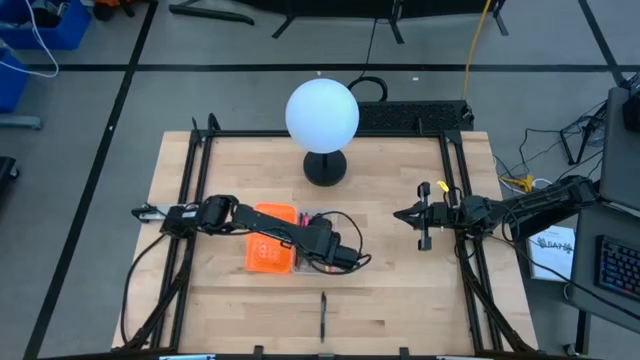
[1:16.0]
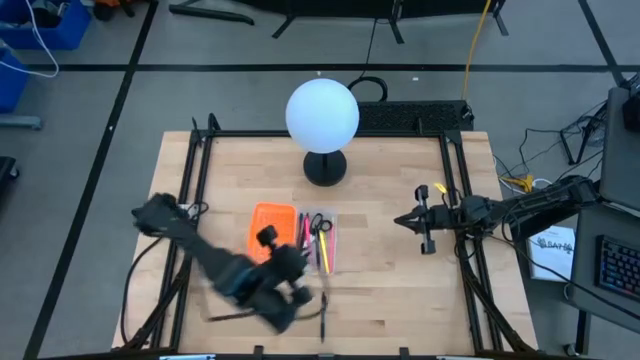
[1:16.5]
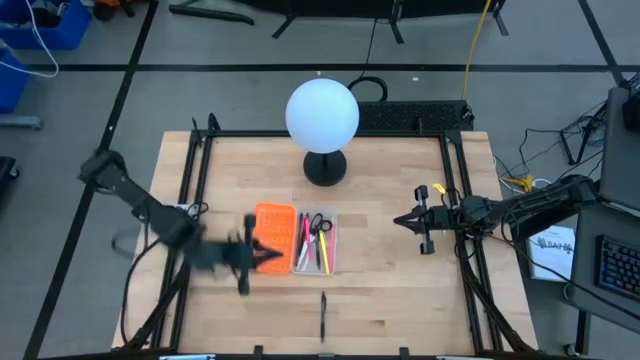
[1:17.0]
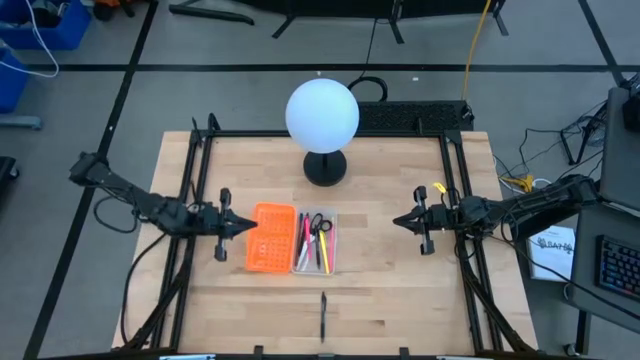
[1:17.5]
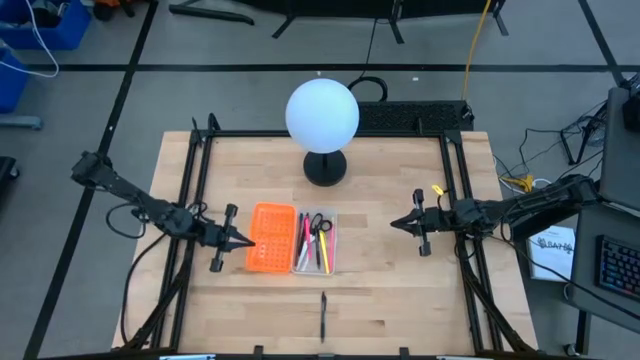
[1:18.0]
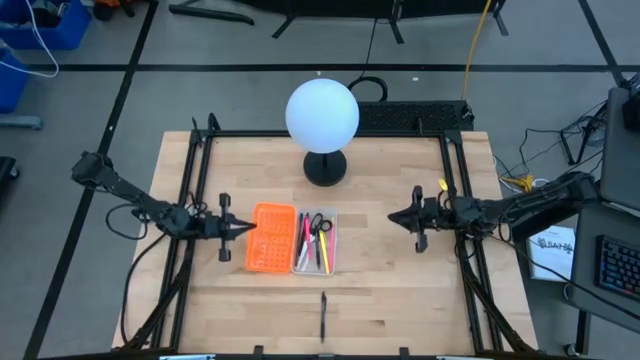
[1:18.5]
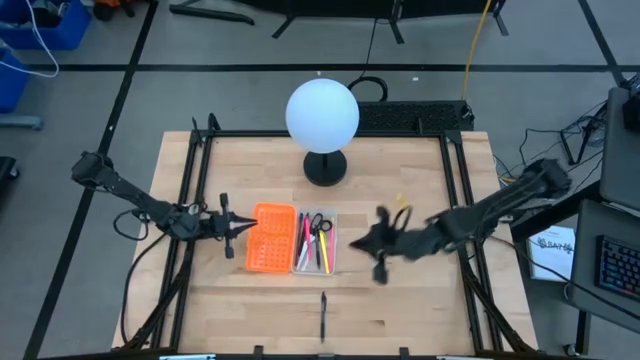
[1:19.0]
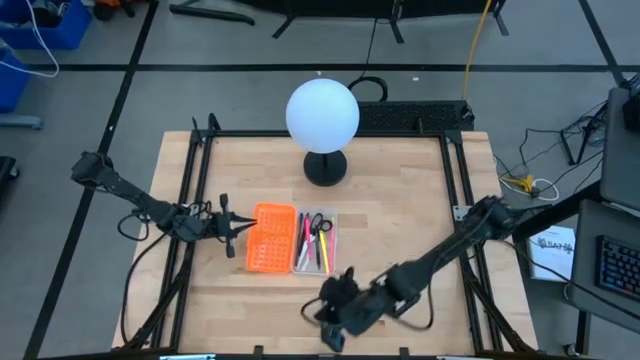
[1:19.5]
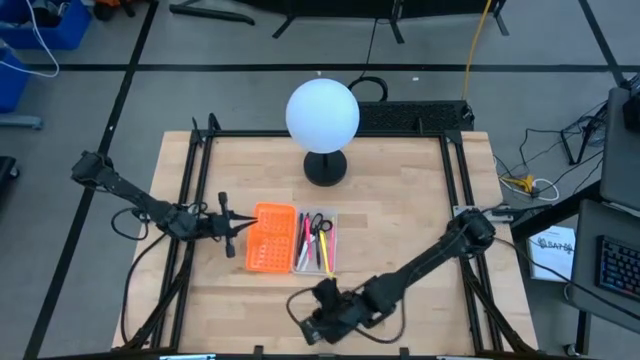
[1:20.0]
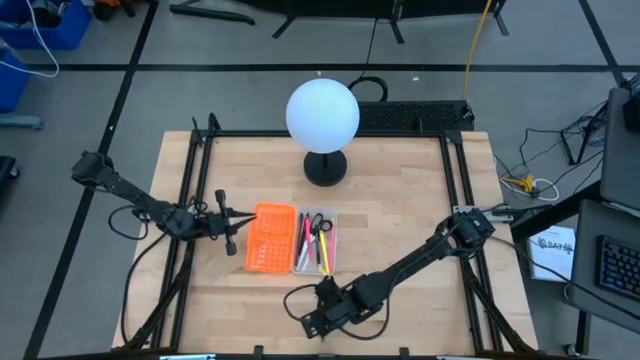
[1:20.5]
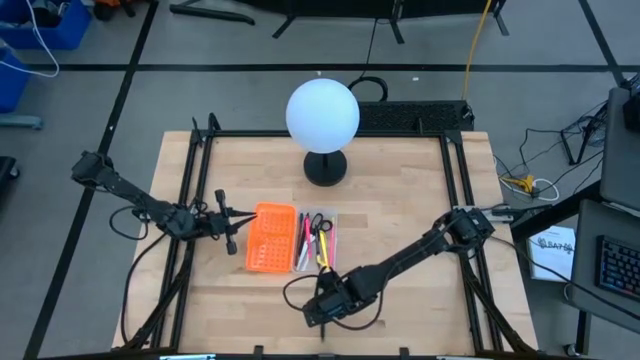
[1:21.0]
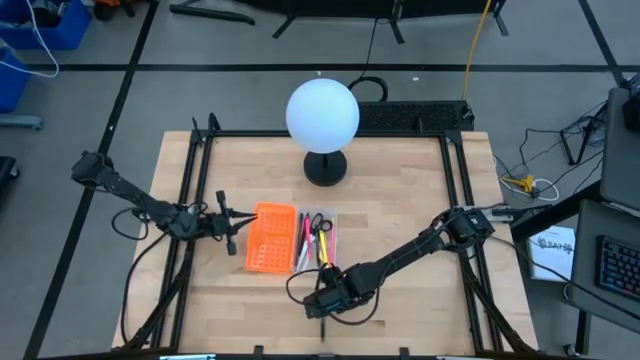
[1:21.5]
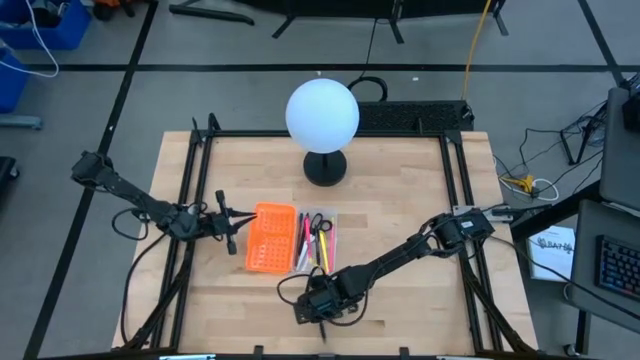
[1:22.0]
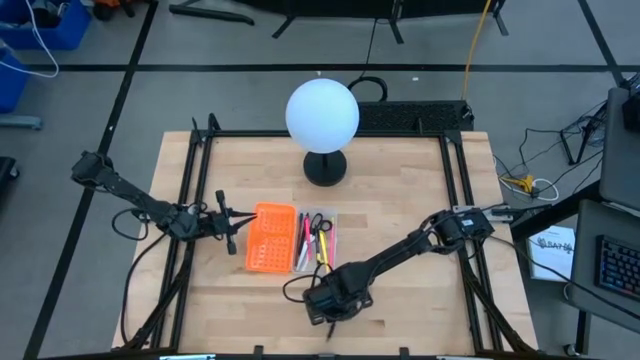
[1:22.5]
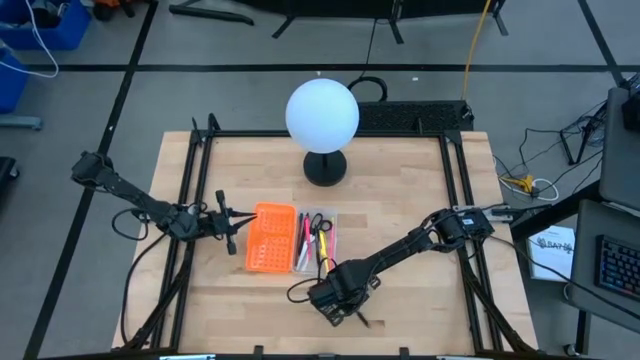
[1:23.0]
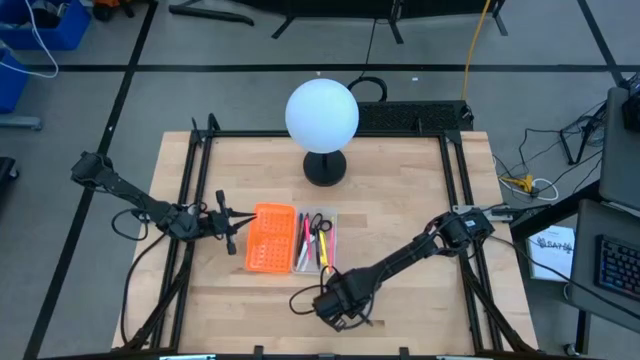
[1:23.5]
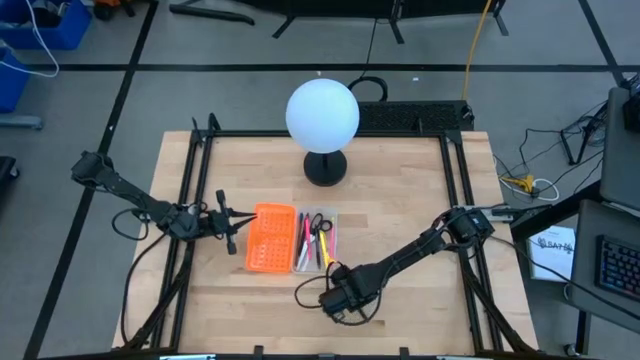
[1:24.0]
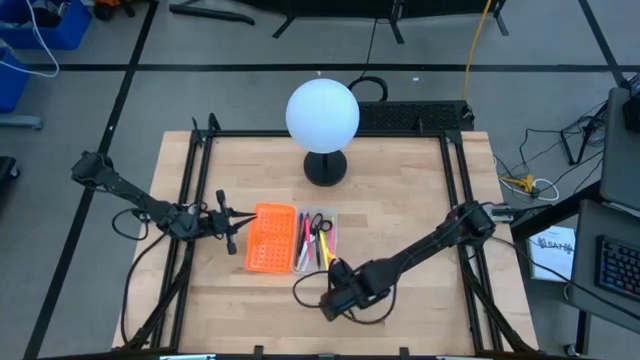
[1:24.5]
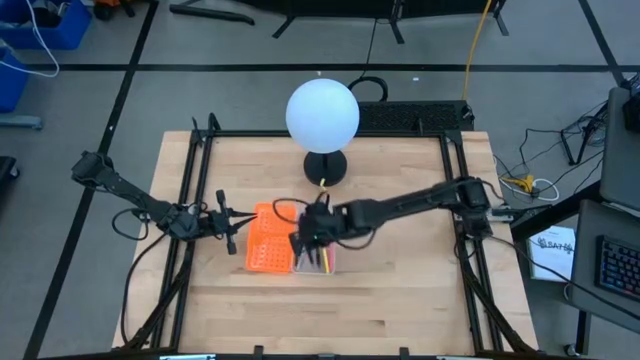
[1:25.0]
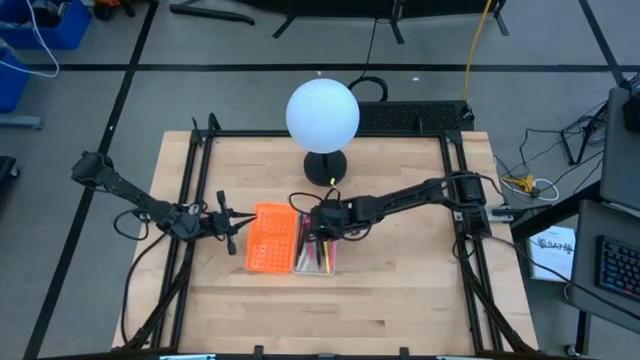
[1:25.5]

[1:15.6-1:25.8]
Task: Pick & place school supplies into a supply box
Put the black gel pen into the orange supply box

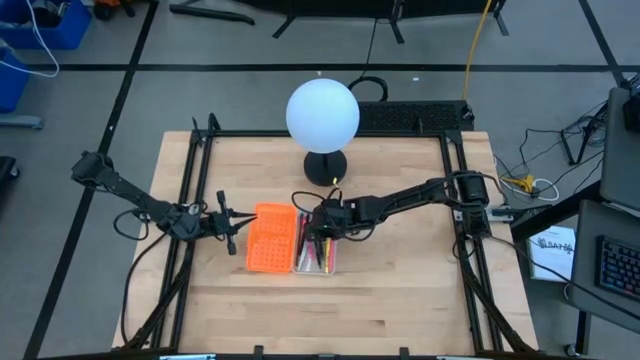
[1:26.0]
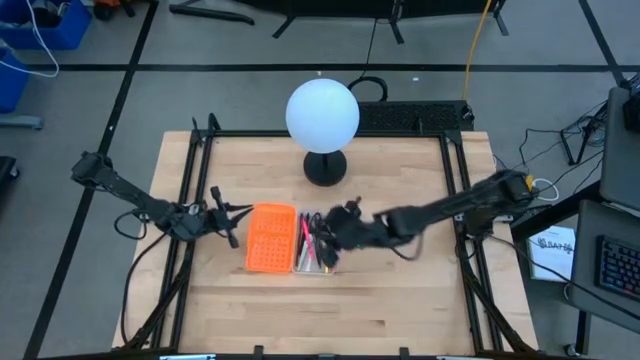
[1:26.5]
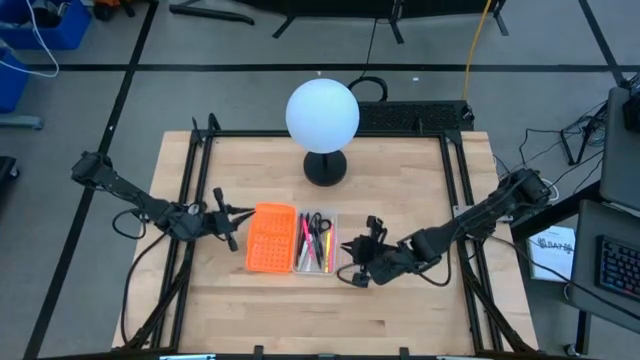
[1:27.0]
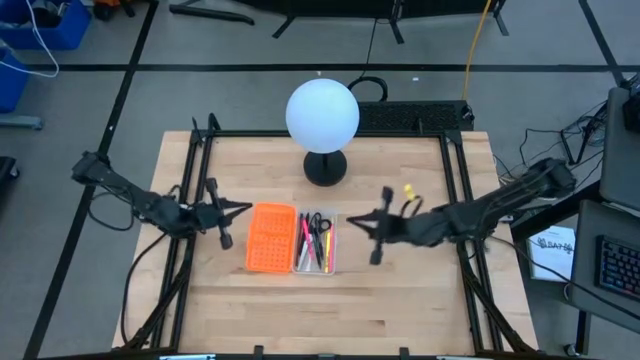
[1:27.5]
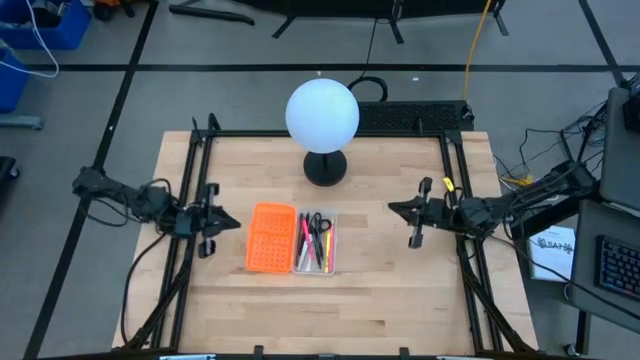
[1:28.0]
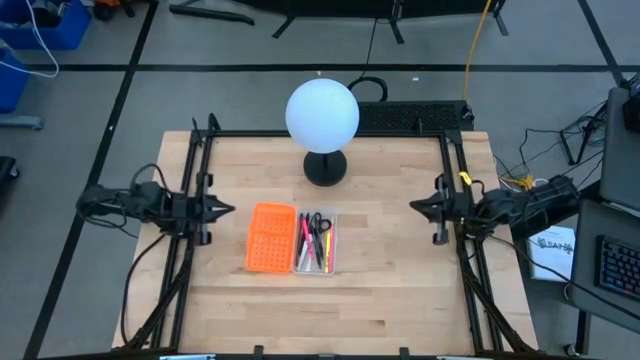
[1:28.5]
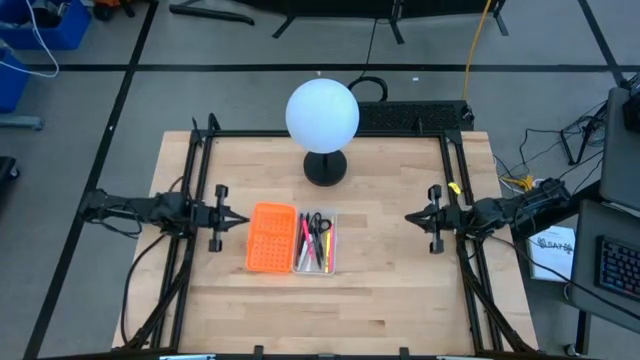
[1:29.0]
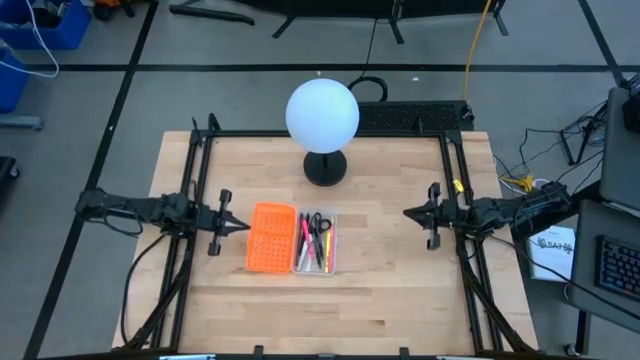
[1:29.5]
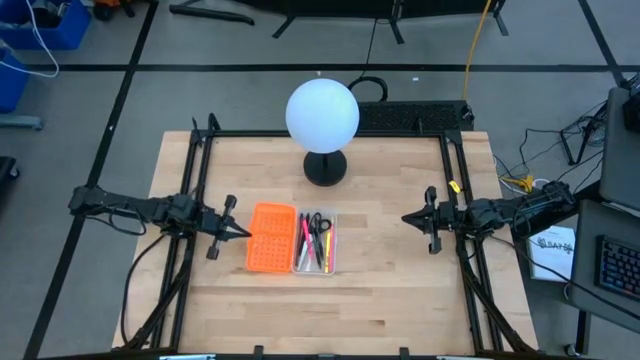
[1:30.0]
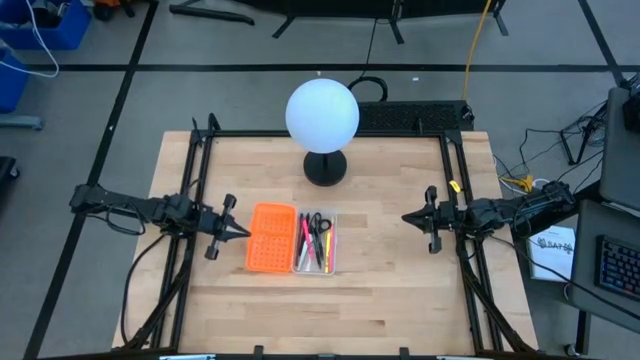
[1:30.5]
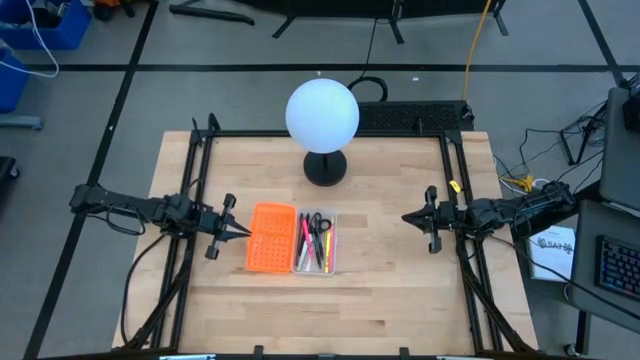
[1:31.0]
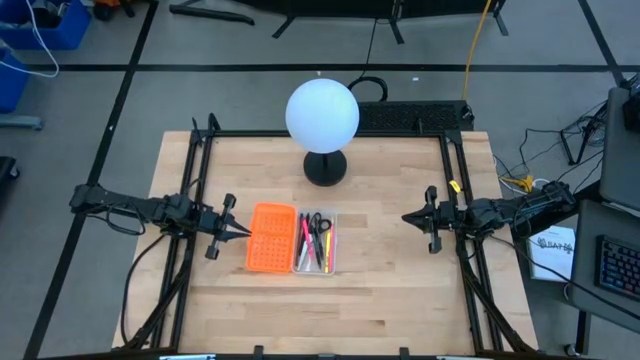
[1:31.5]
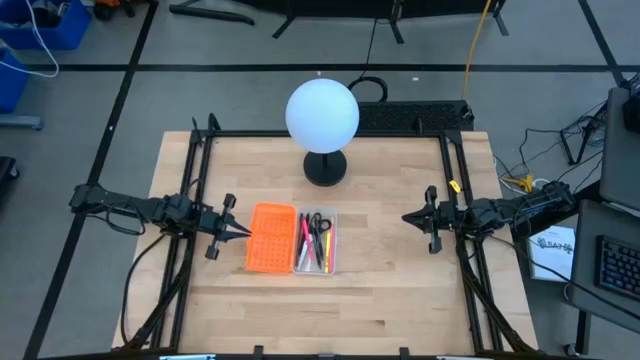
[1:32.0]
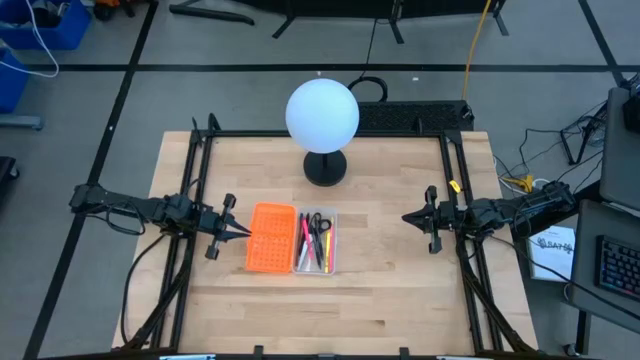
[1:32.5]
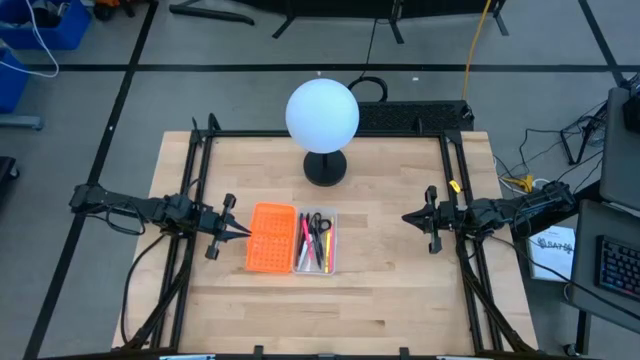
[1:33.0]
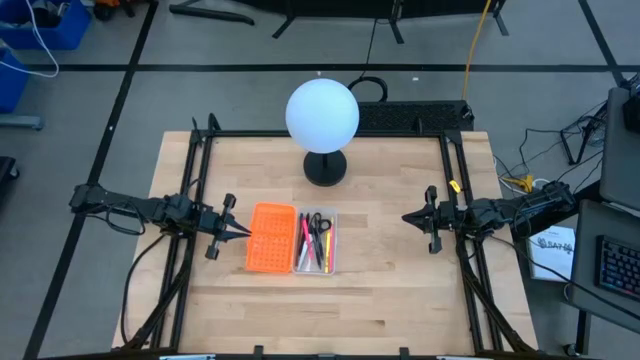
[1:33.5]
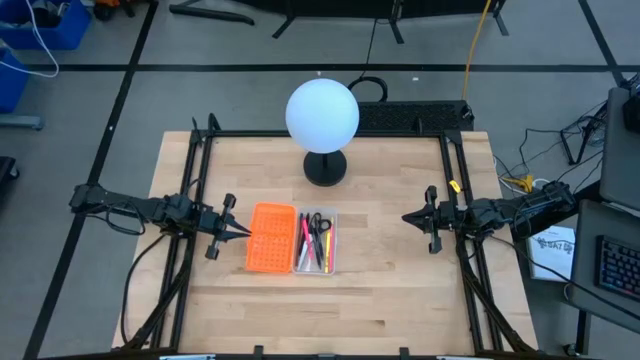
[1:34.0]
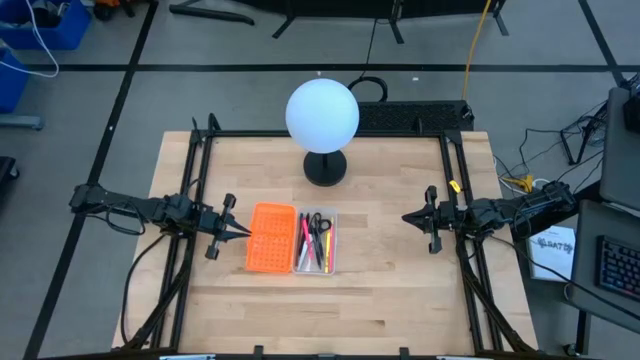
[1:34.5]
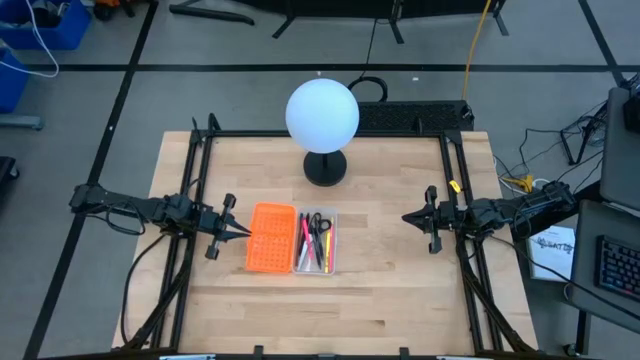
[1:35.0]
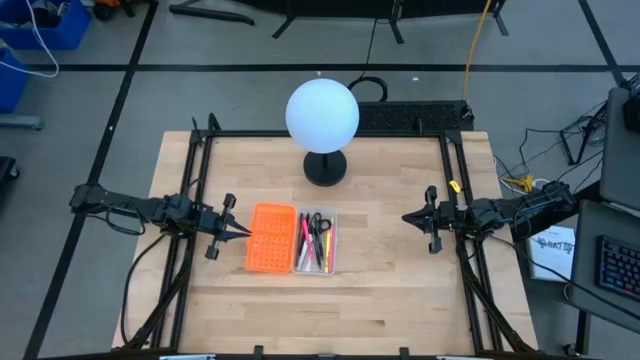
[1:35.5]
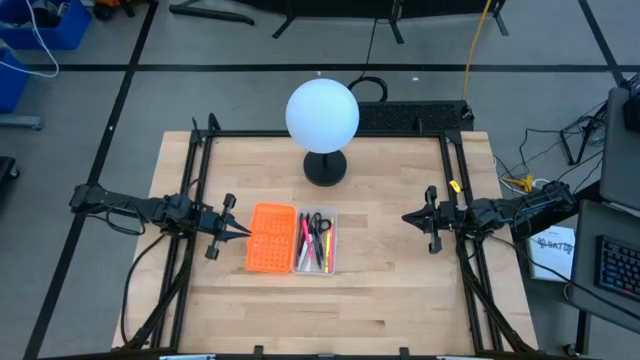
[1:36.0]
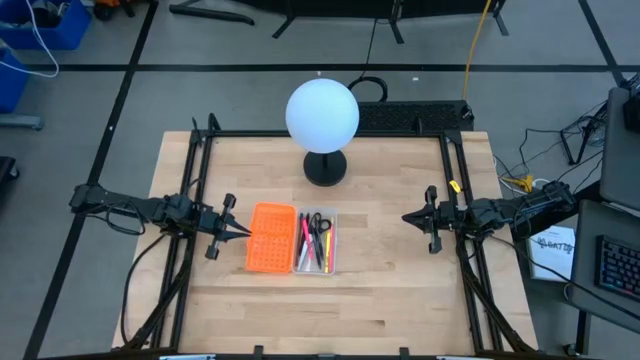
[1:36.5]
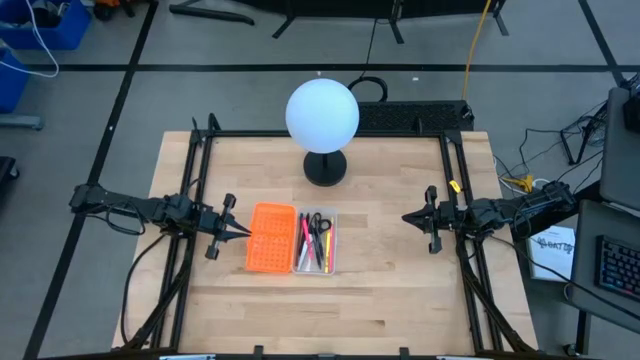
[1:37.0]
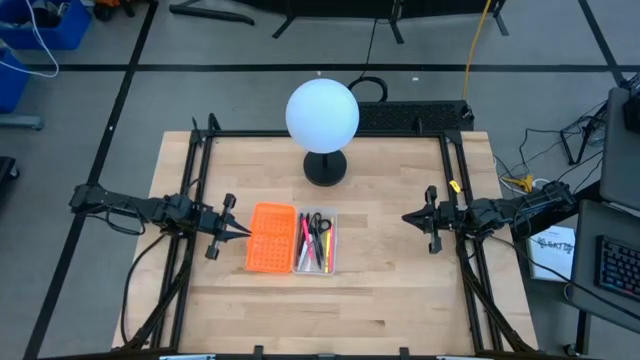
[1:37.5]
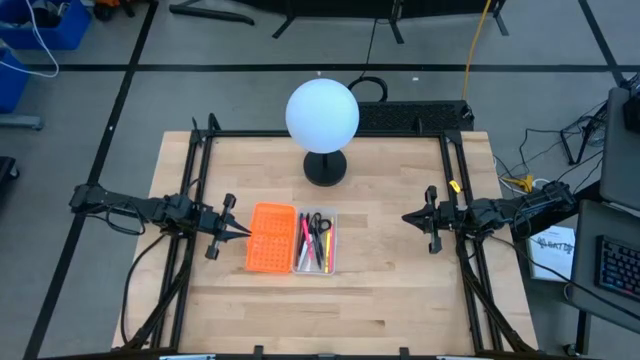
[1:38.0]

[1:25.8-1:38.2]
Return to Home Position

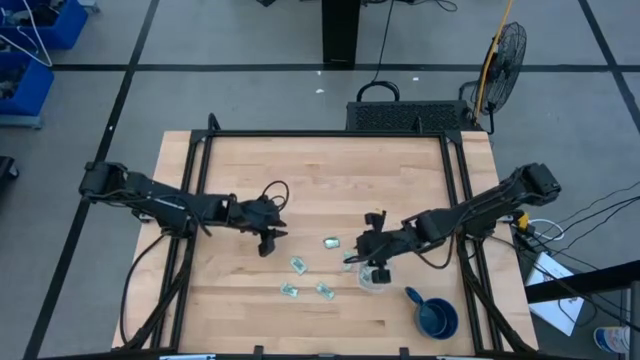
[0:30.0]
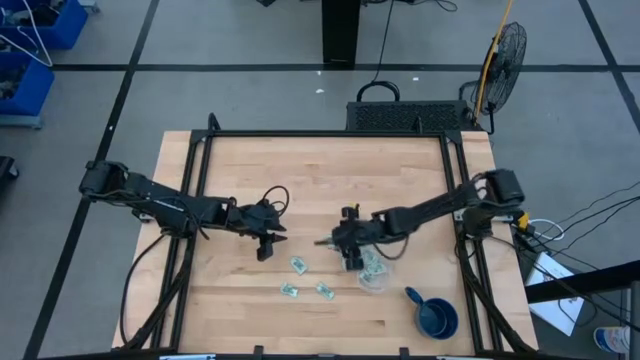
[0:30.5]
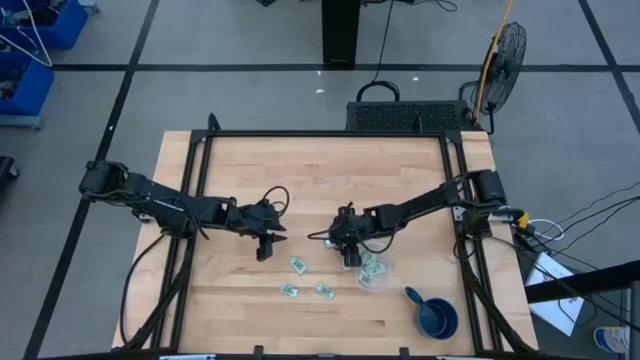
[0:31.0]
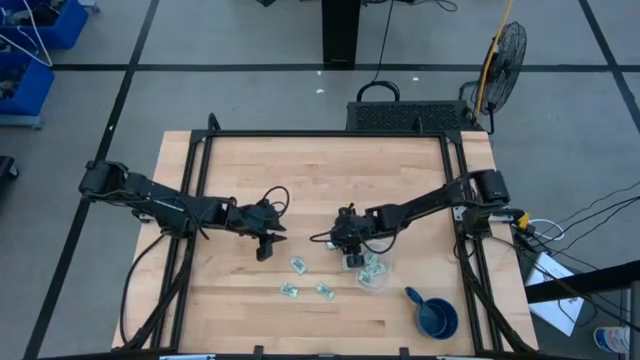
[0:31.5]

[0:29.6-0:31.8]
Task: Pick and place Stevia / Truvia into bins
Put the truvia packet into the transparent container
